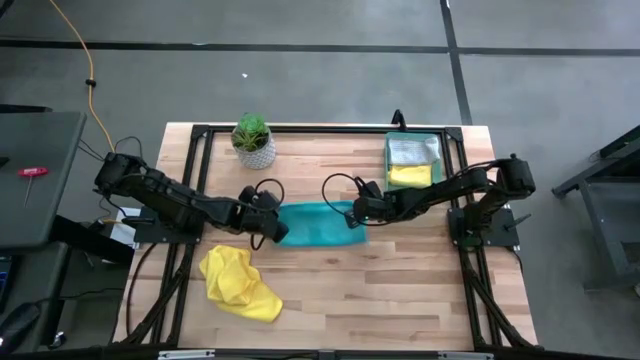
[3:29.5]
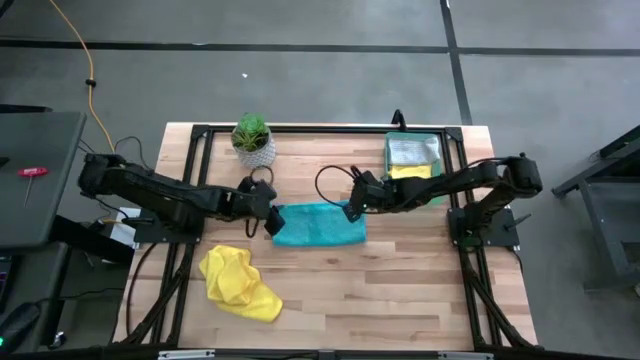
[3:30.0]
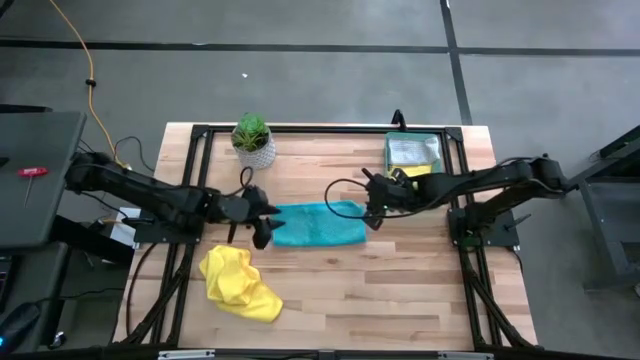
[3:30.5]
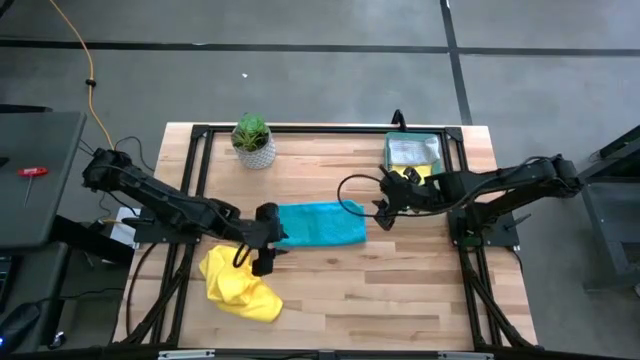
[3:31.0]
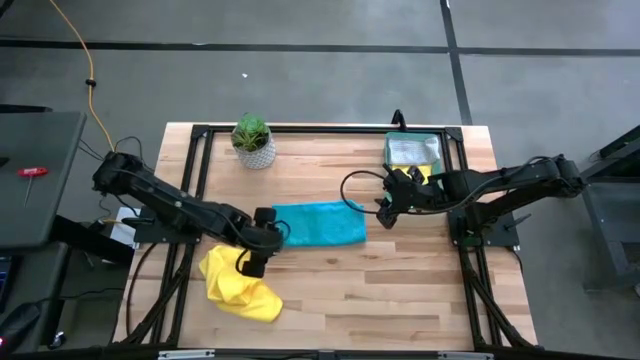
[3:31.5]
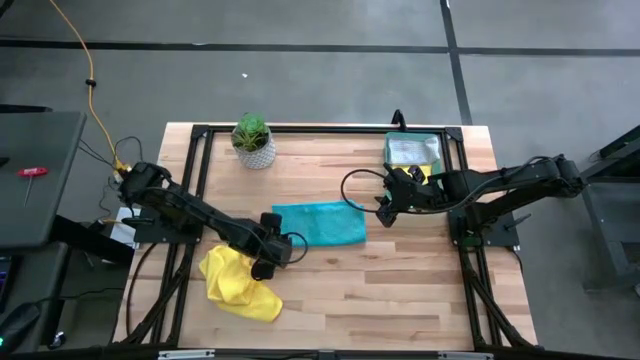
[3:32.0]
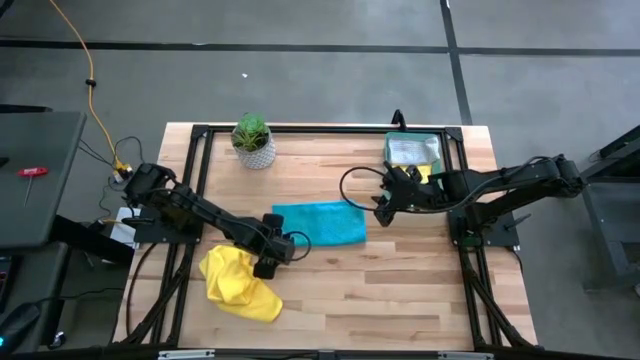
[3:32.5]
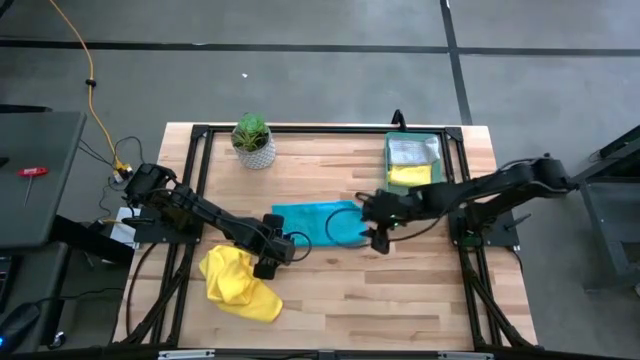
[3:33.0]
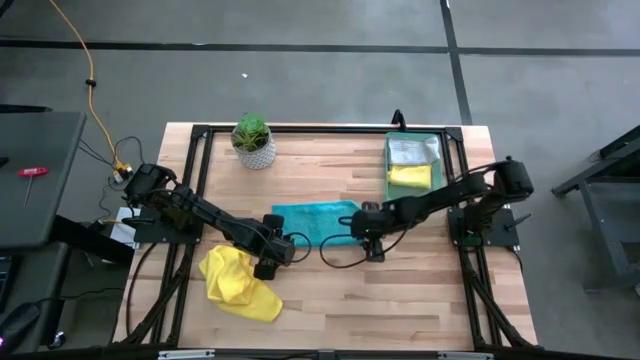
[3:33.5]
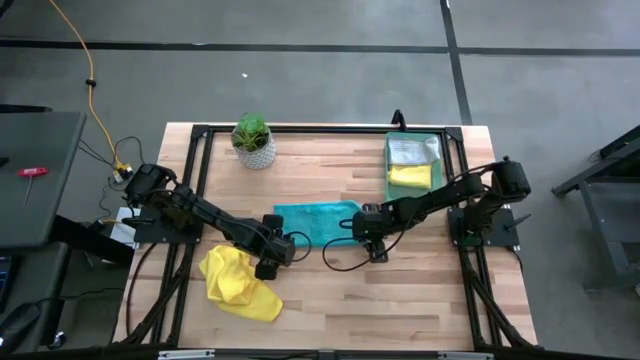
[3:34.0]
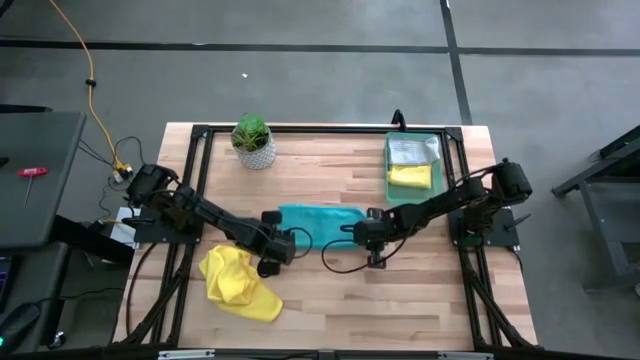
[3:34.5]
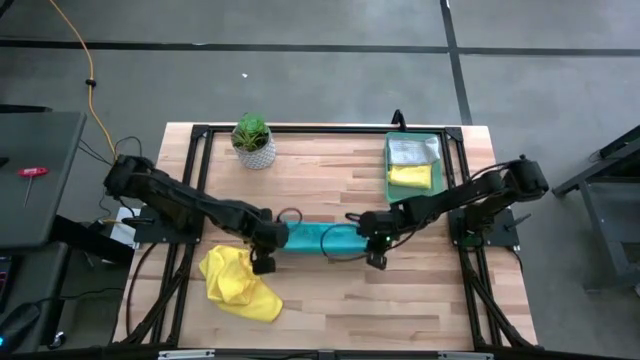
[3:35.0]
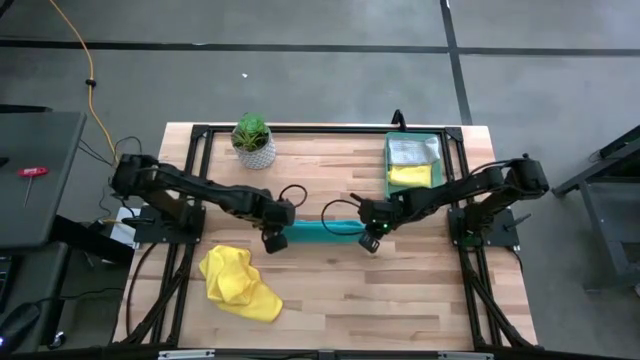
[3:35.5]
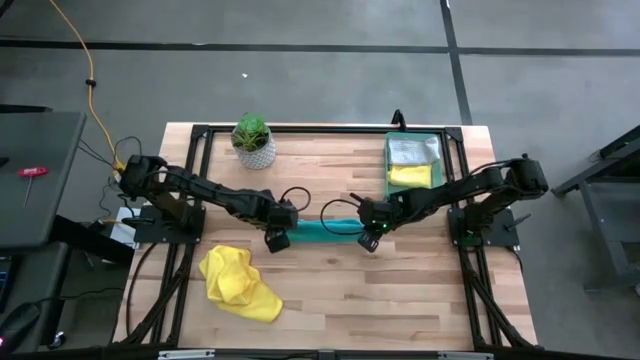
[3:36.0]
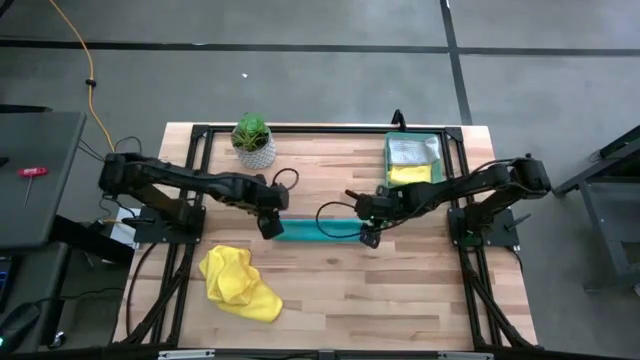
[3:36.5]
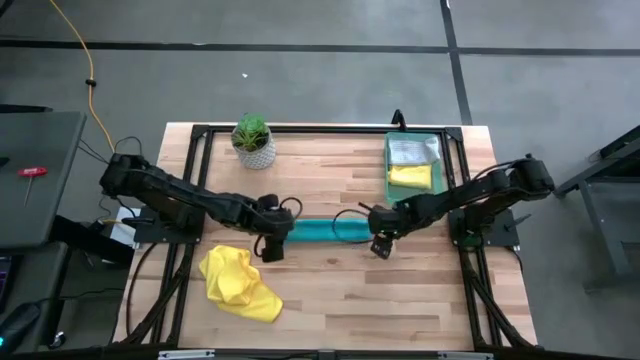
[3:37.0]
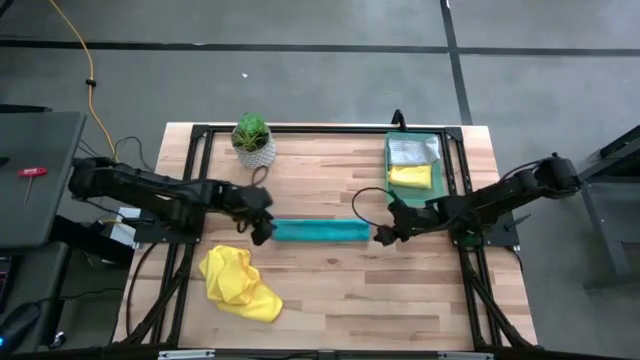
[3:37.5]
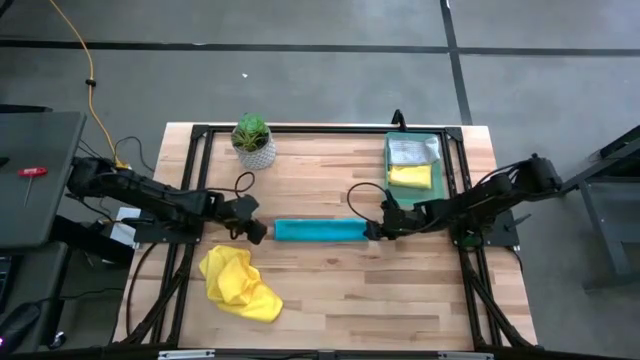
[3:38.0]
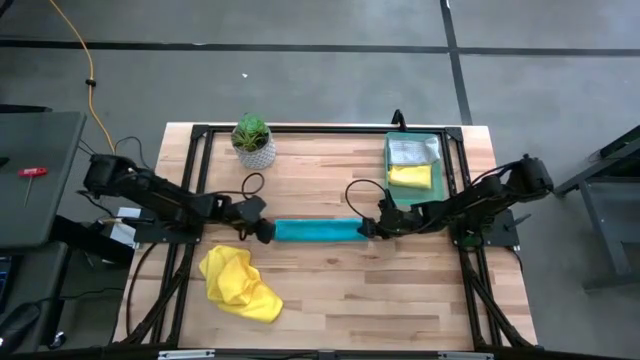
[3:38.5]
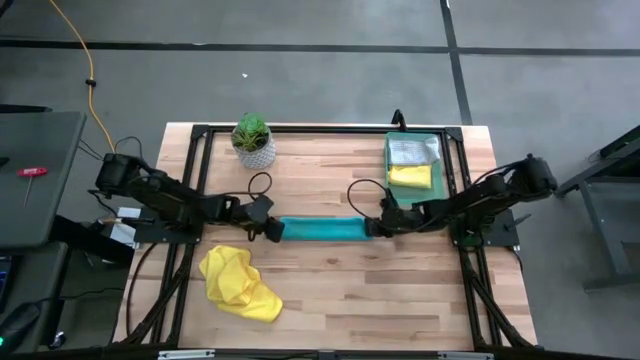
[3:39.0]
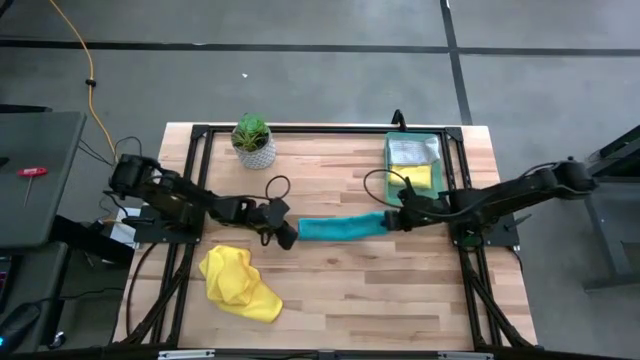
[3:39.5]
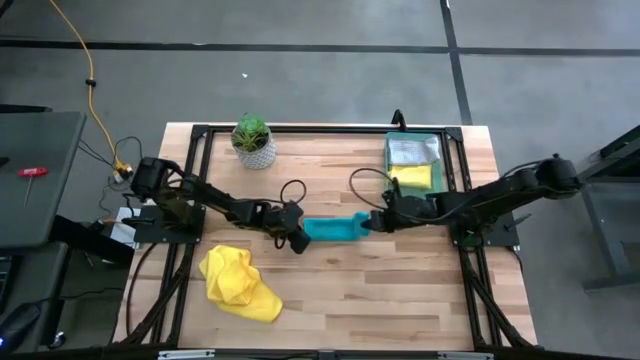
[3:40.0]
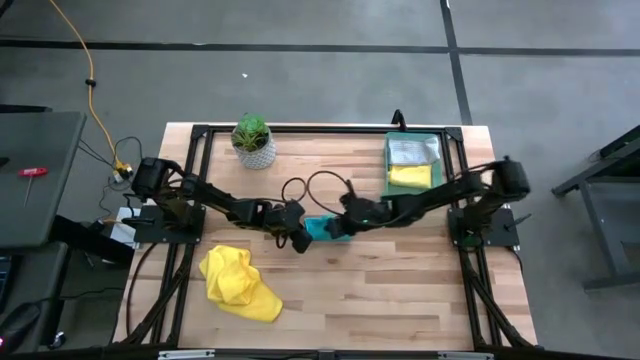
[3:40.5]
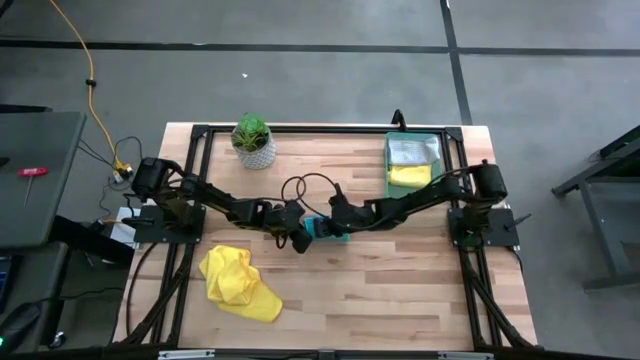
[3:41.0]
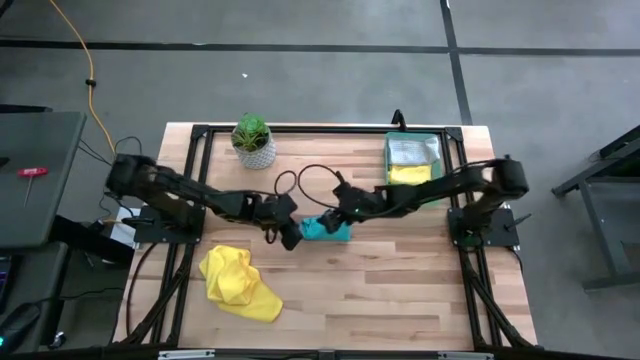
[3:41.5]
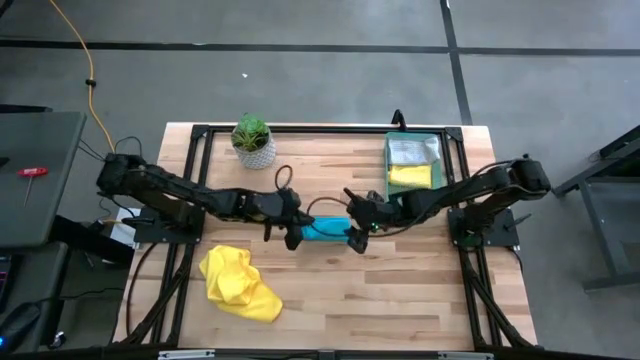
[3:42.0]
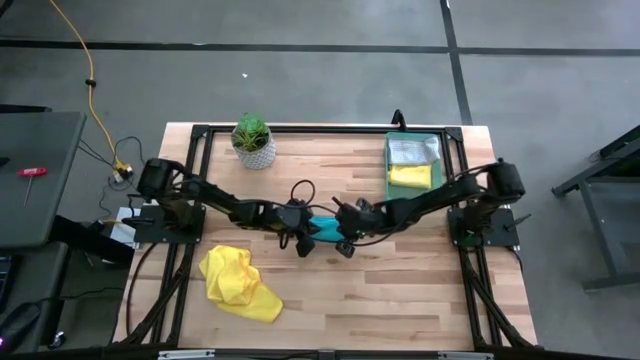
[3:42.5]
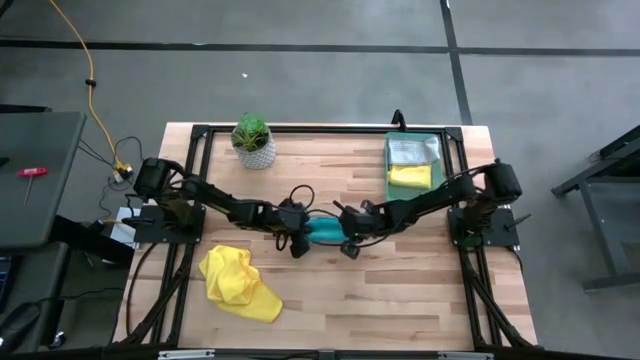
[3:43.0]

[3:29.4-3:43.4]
Task: Fold microfiber towels
Fold the blue microfiber cloth

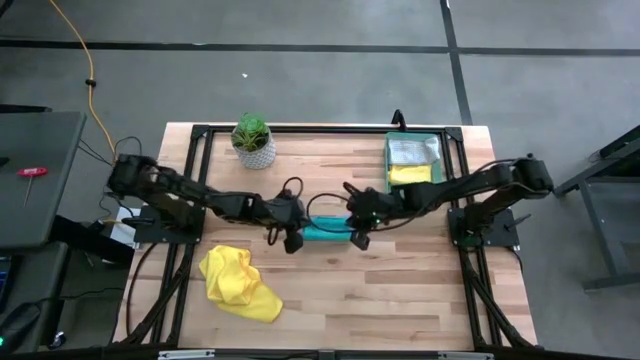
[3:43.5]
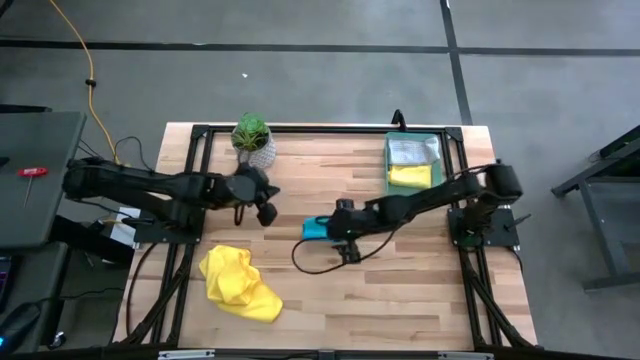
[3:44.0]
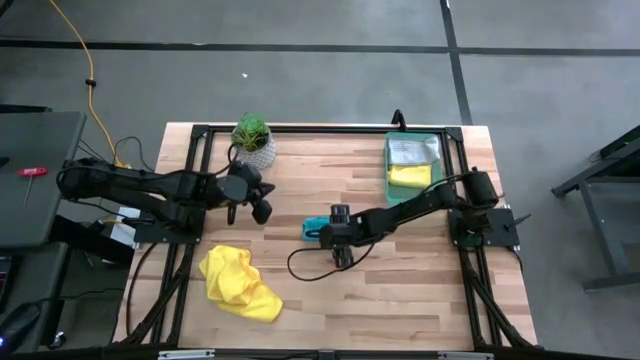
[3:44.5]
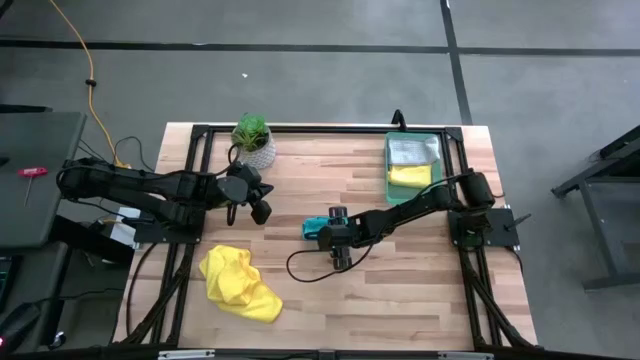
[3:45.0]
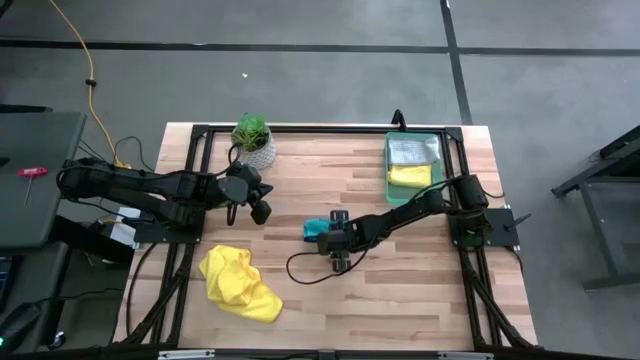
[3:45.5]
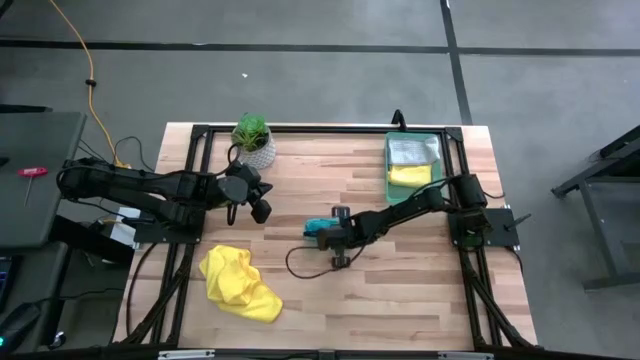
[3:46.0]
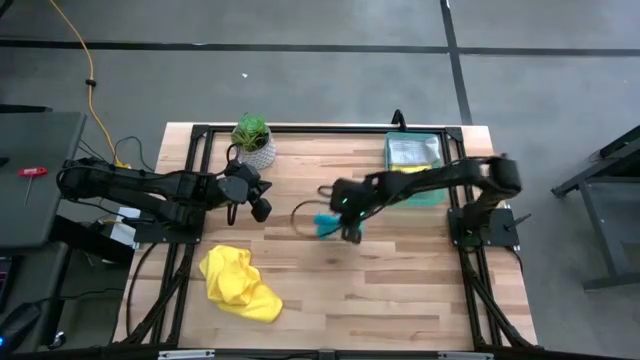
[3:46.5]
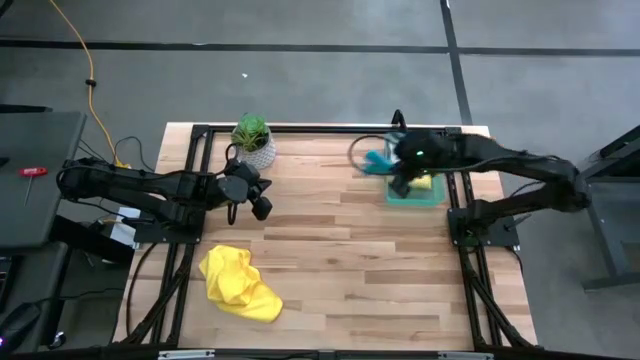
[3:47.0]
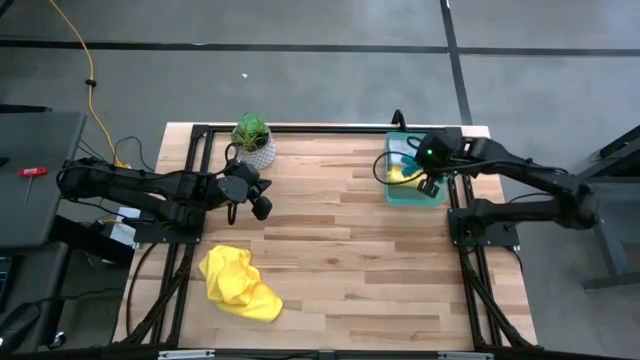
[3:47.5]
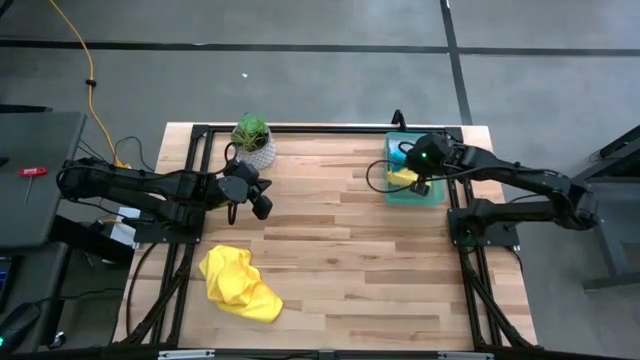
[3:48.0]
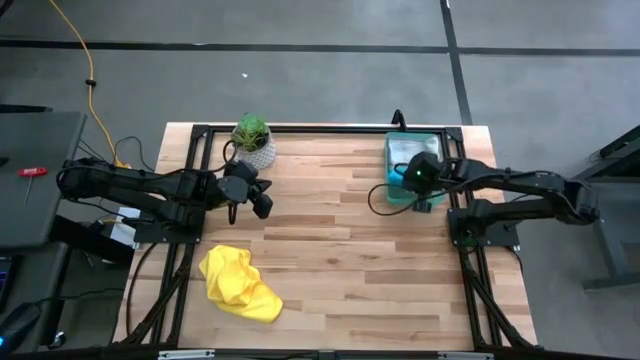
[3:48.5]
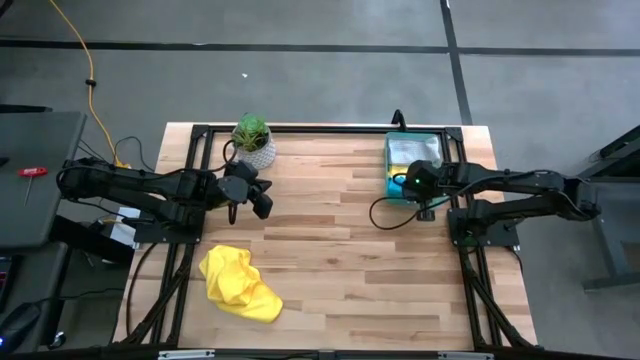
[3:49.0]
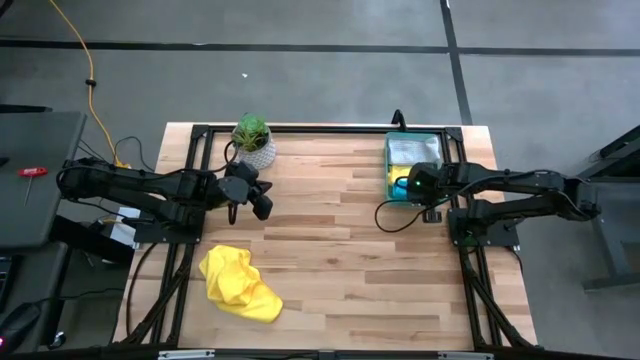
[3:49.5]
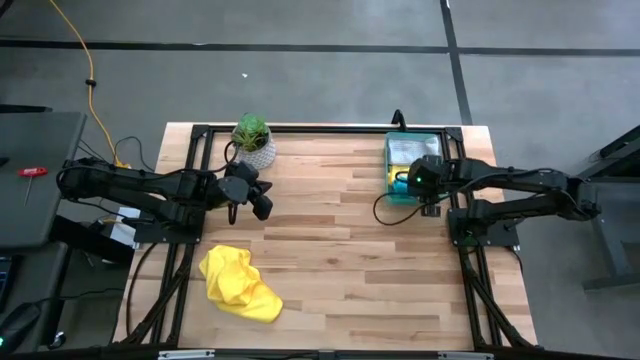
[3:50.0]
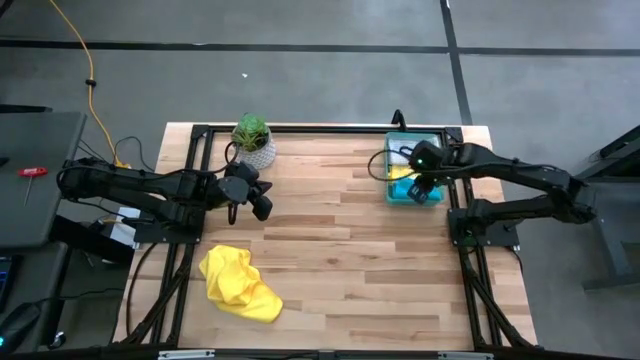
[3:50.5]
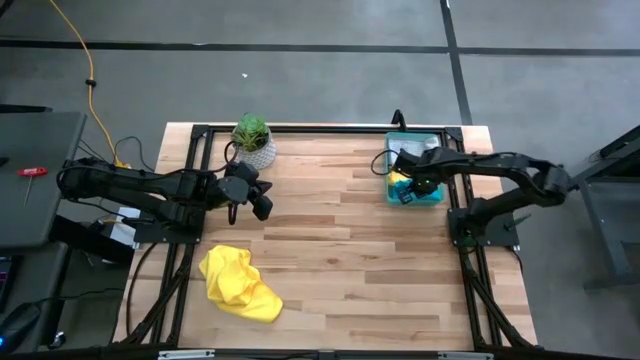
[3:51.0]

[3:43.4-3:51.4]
Put the folded blue microfiber cloth into the green bin
